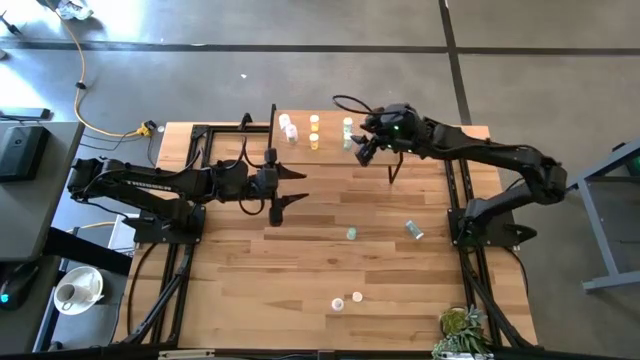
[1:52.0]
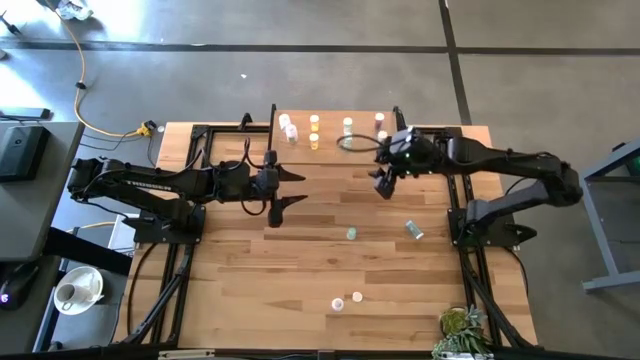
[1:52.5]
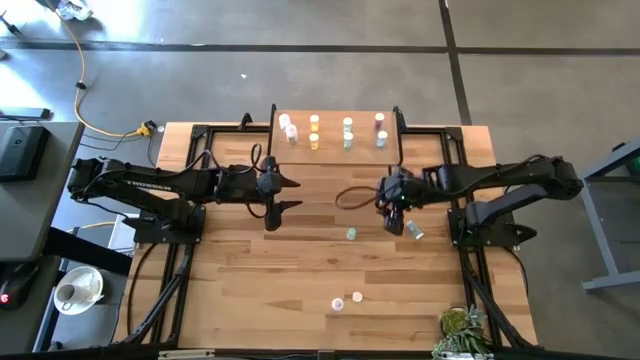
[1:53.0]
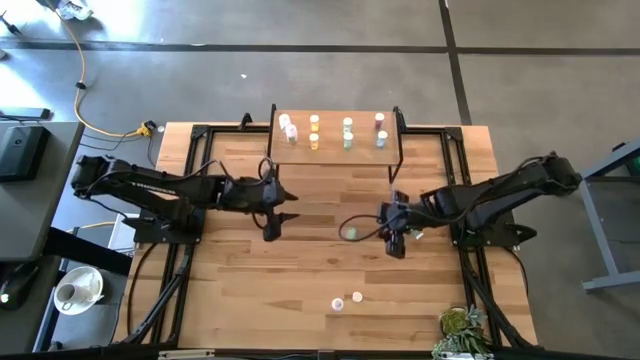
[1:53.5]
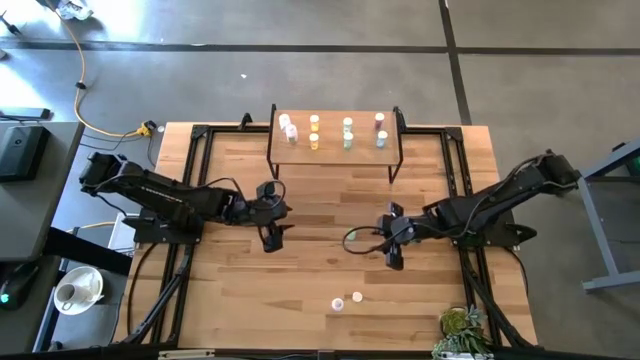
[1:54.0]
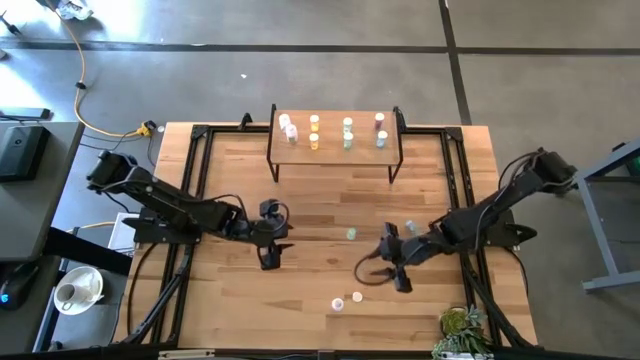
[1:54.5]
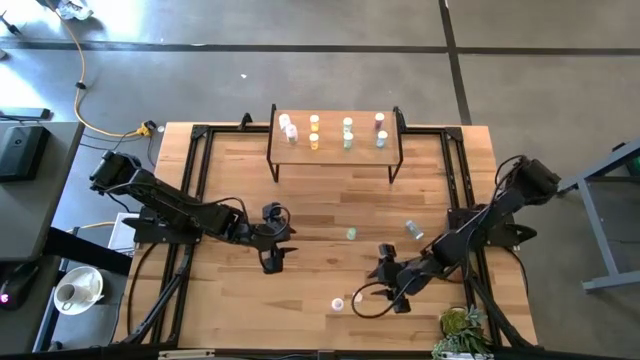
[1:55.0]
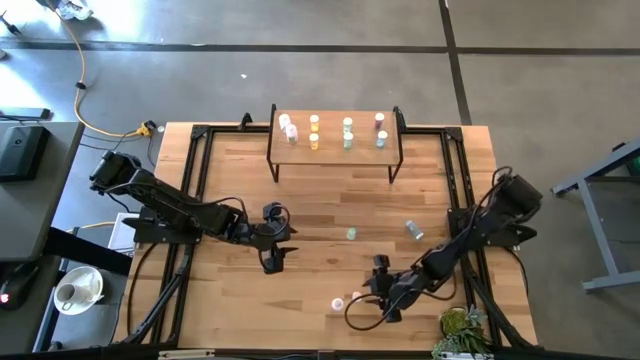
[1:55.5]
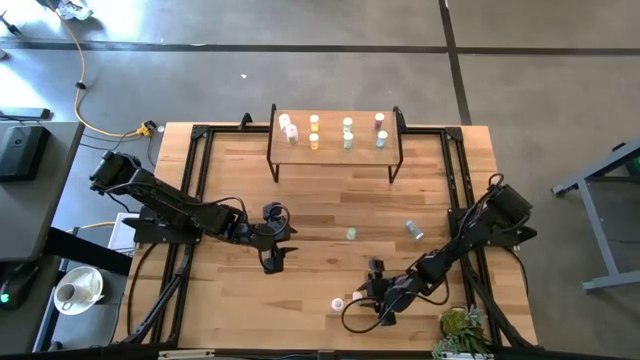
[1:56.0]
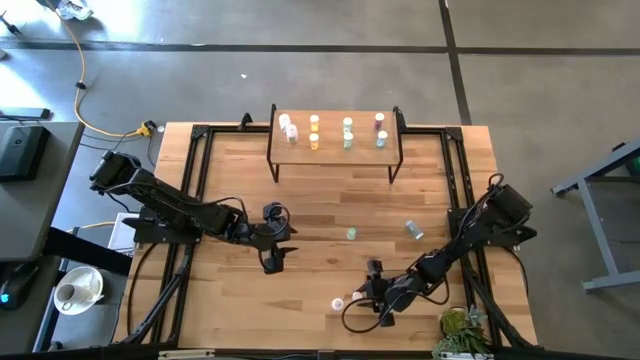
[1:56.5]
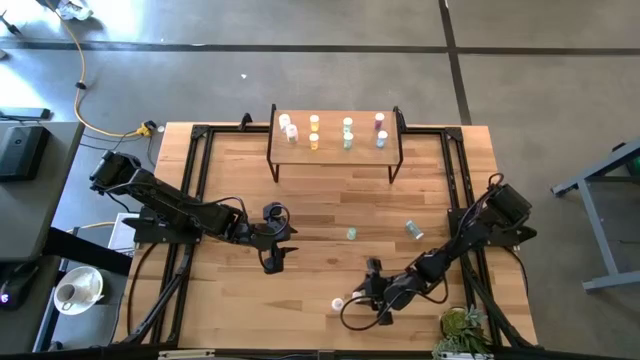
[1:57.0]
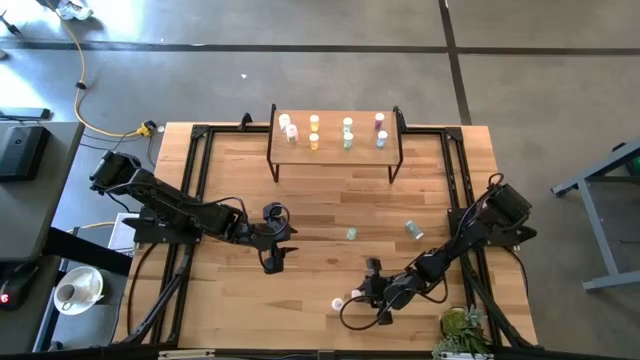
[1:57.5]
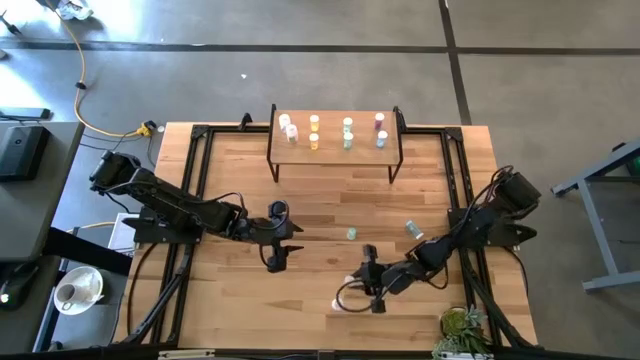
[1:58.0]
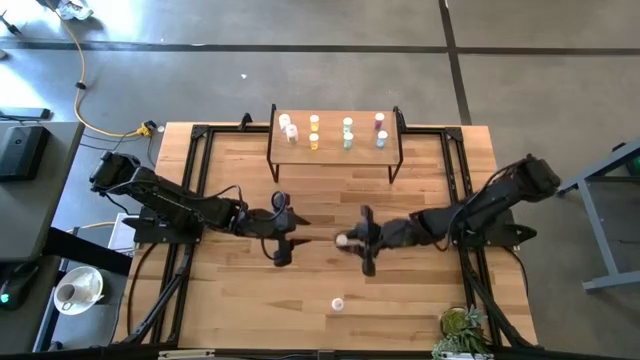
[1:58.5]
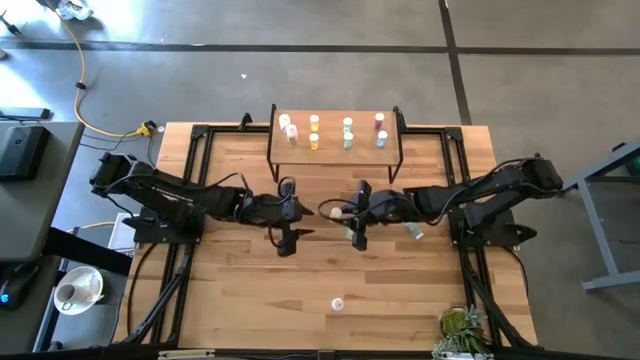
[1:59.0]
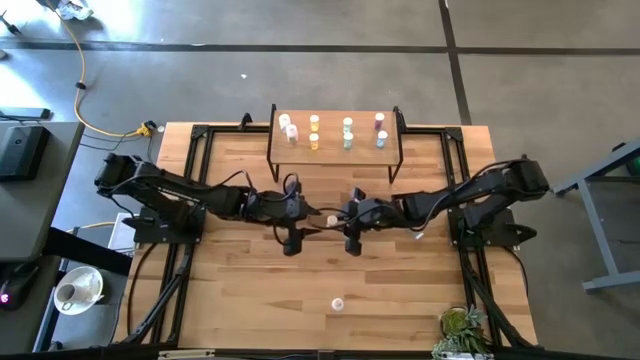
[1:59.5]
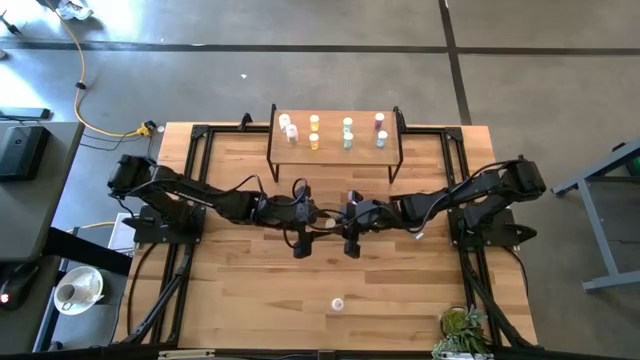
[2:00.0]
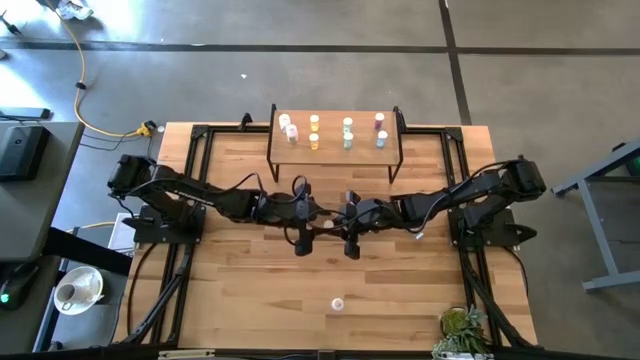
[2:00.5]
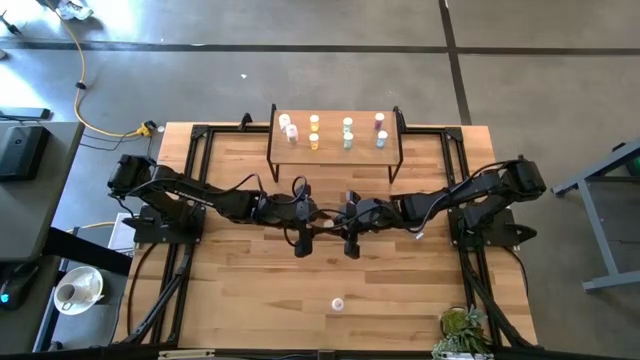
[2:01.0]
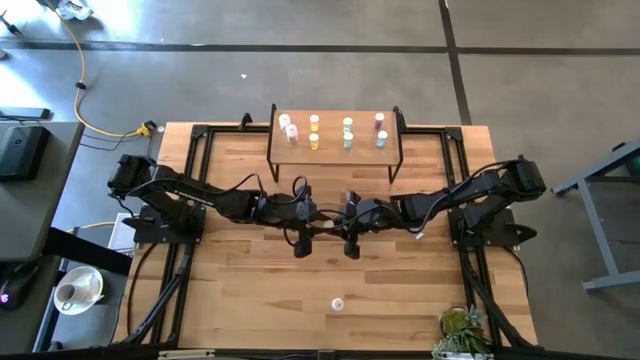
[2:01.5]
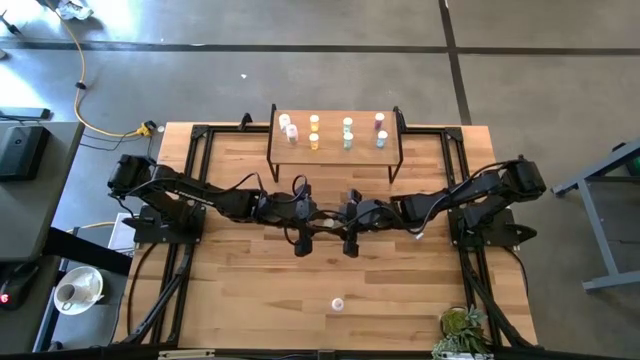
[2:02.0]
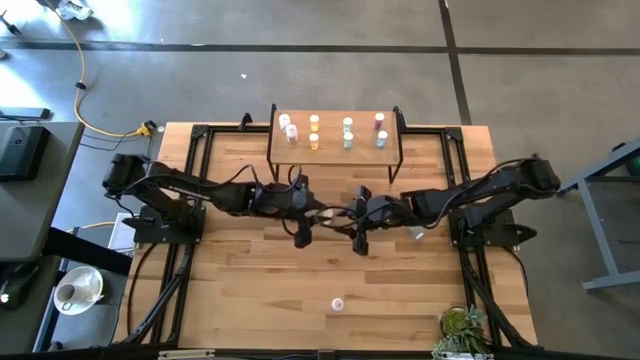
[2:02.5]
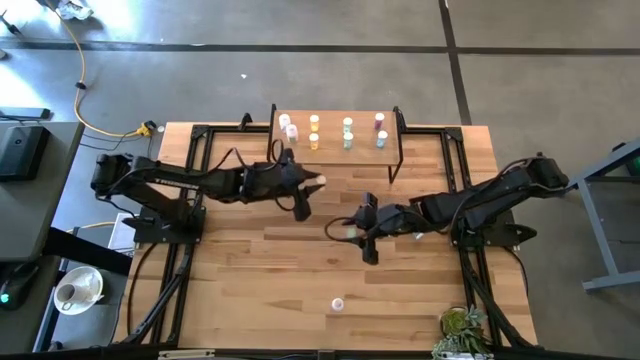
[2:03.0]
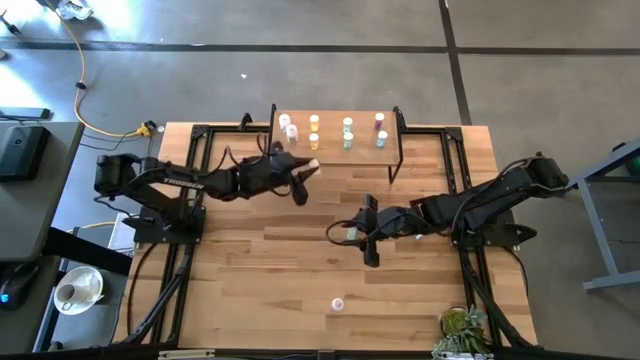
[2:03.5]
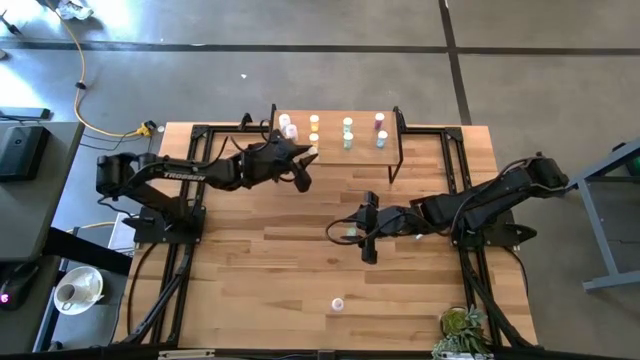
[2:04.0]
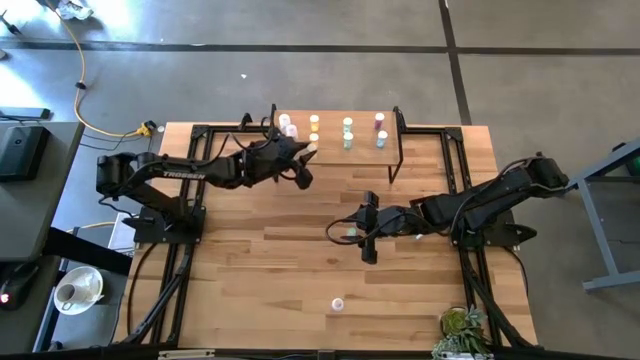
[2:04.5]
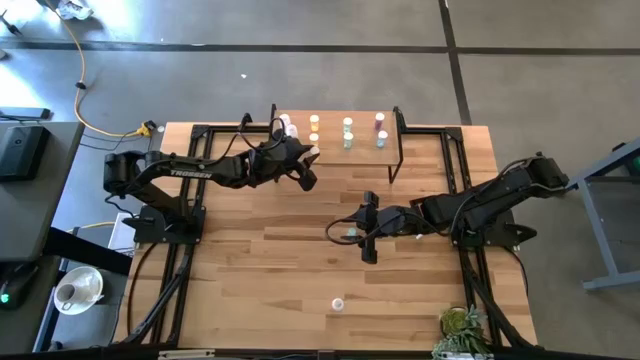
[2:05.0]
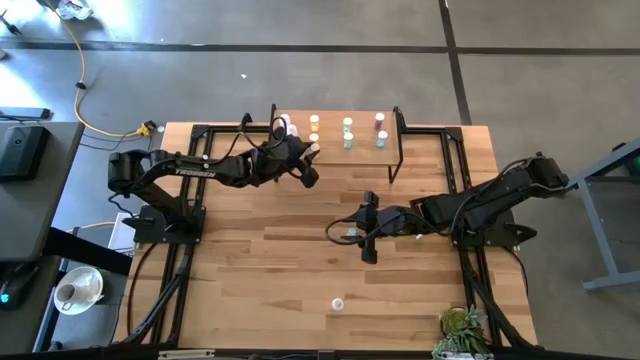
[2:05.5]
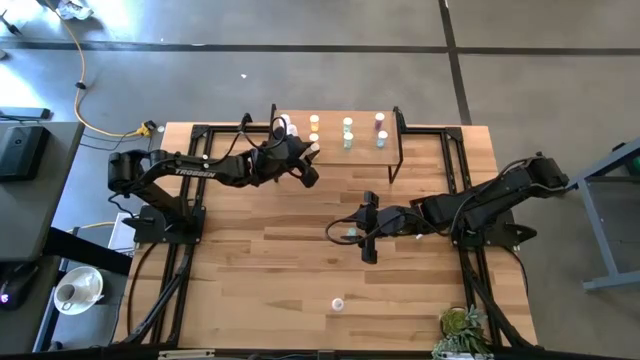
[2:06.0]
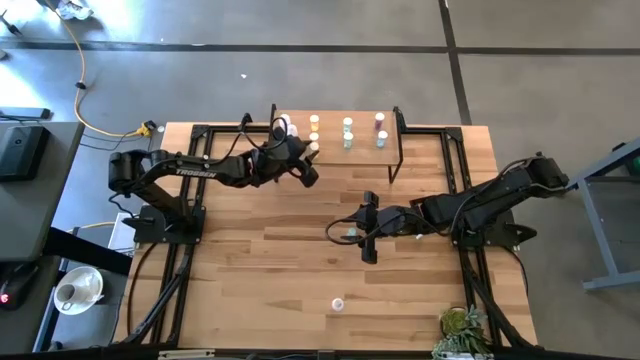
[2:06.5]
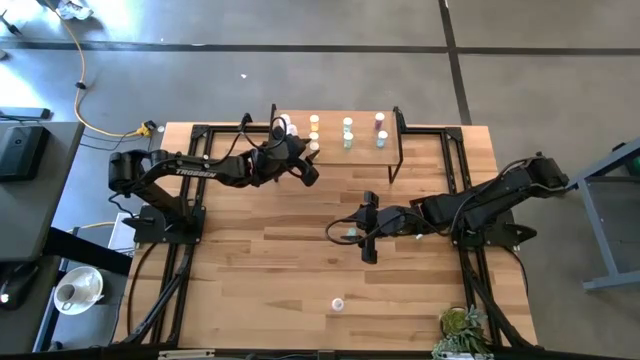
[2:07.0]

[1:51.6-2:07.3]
Task: Pick and place medicine bottles onto shelf by color
Put the yellow pill bottle on the shelf aligned with the other yellow pill bottles

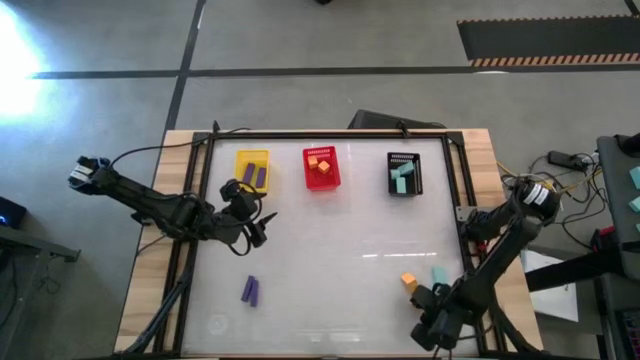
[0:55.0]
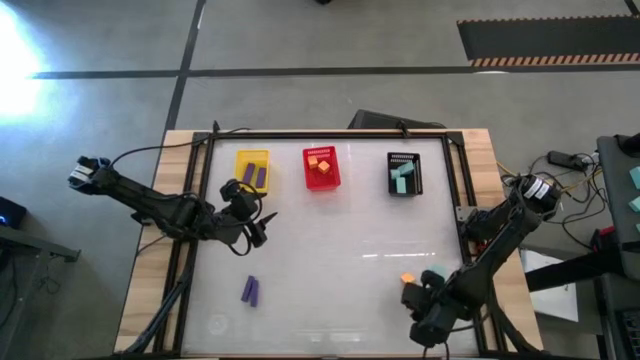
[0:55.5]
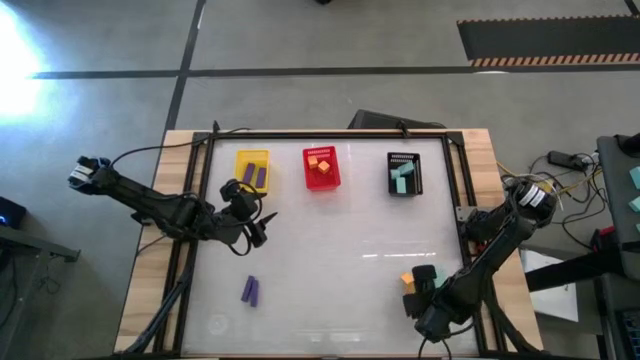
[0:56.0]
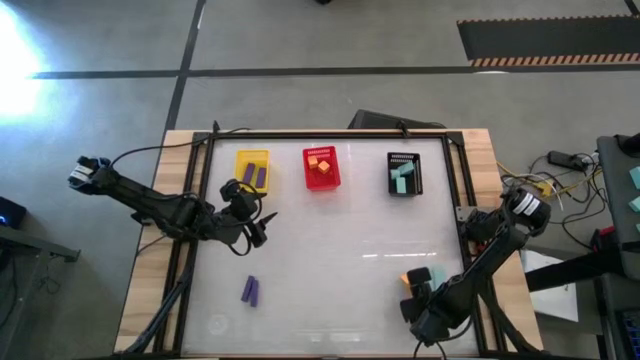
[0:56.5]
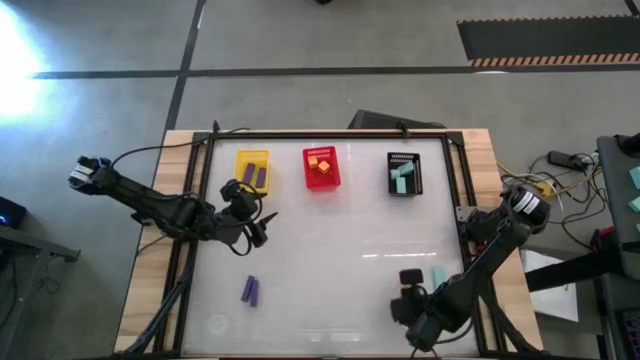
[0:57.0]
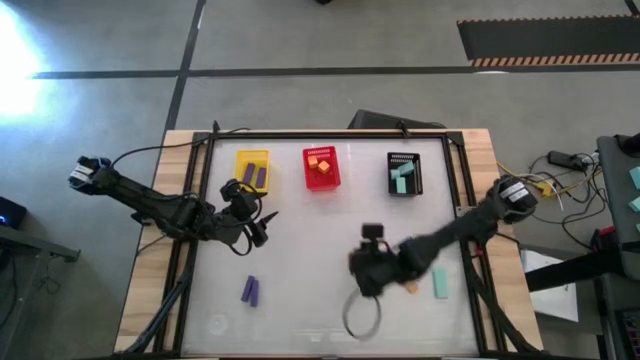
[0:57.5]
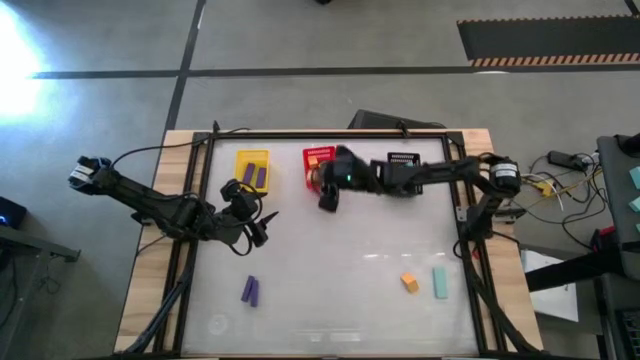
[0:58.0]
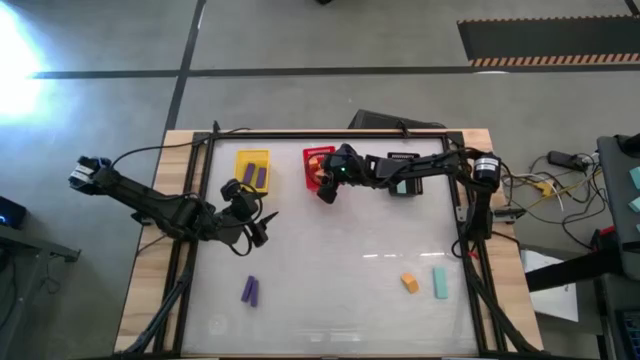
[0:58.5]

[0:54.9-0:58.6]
Task: Sort & place blocks by color
Put the yellow block into the red bin

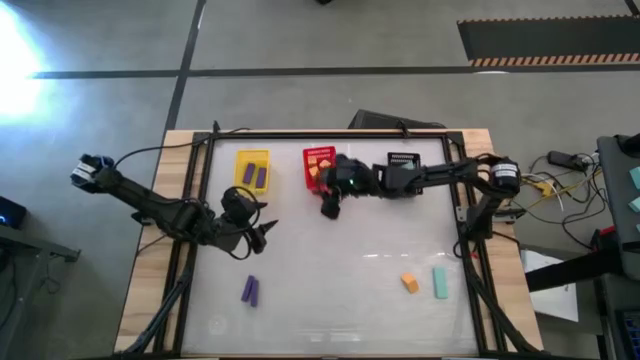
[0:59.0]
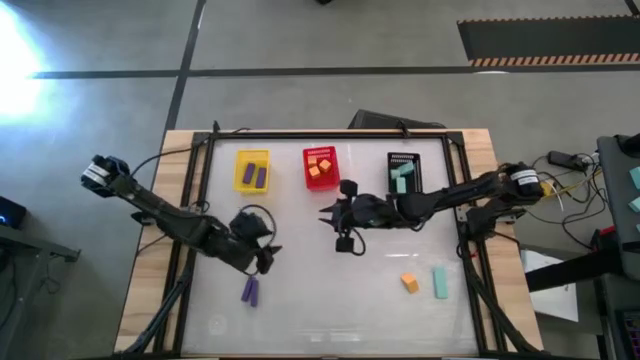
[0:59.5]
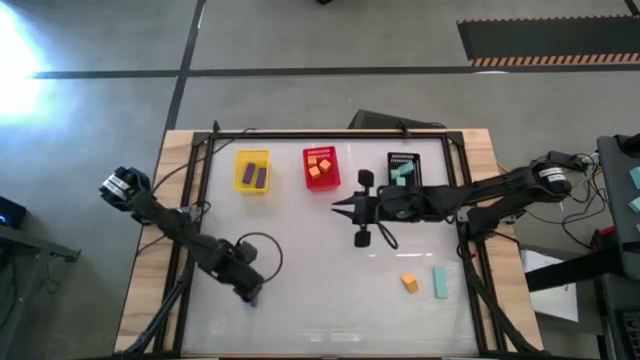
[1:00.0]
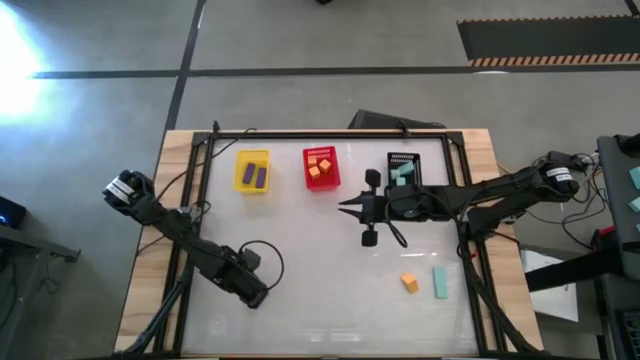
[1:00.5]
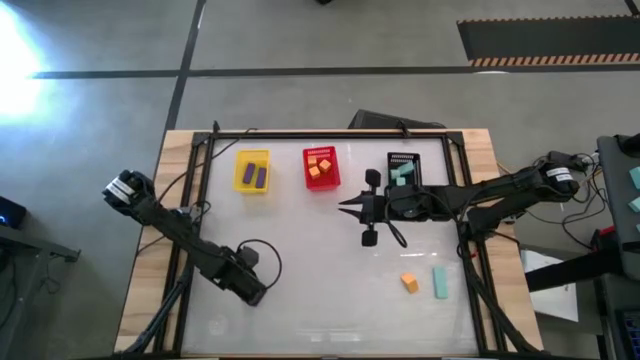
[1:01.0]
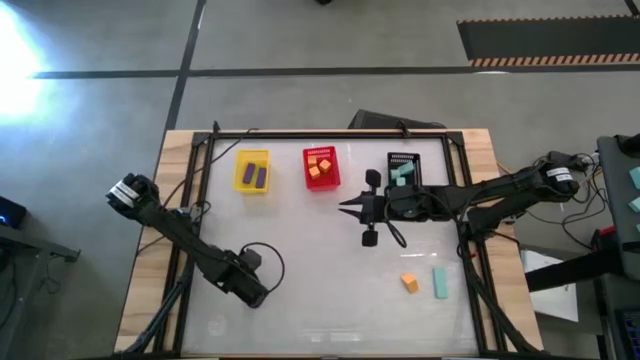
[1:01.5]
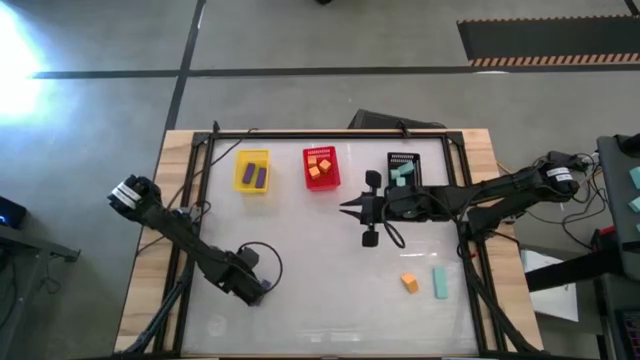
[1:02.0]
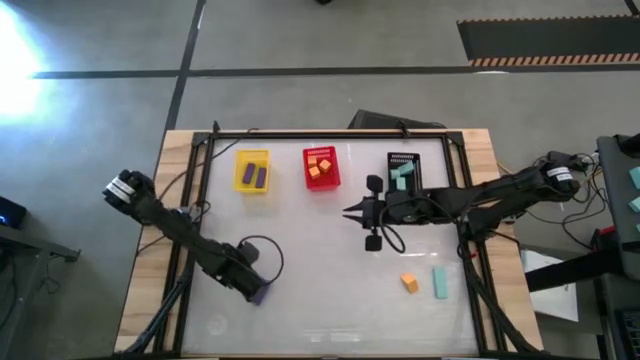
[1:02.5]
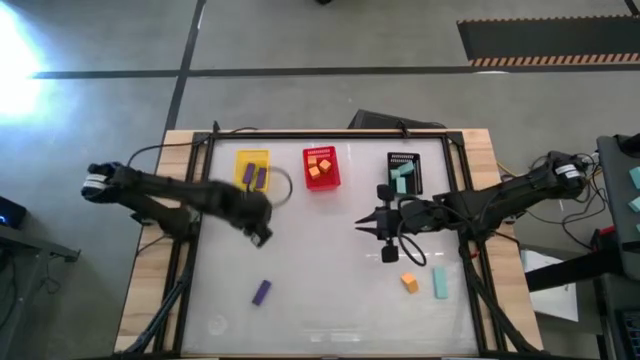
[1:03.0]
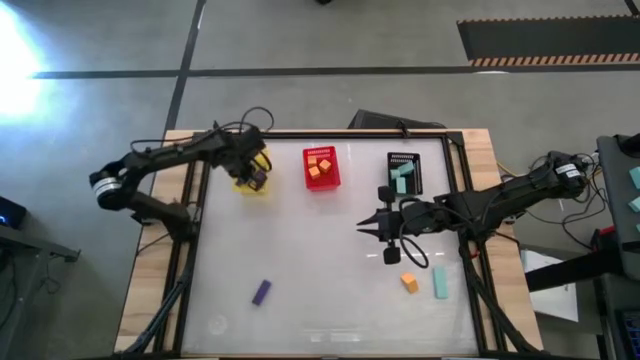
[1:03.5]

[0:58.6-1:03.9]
Put the purple block into the yellow bin
